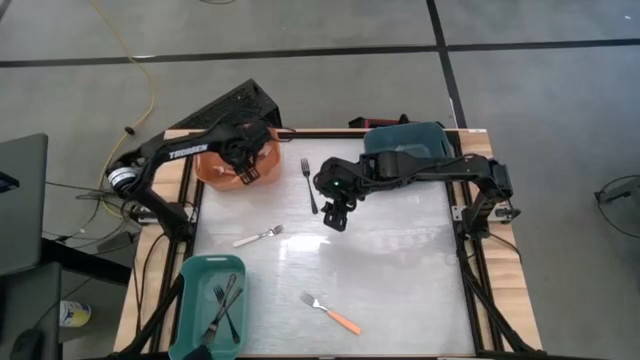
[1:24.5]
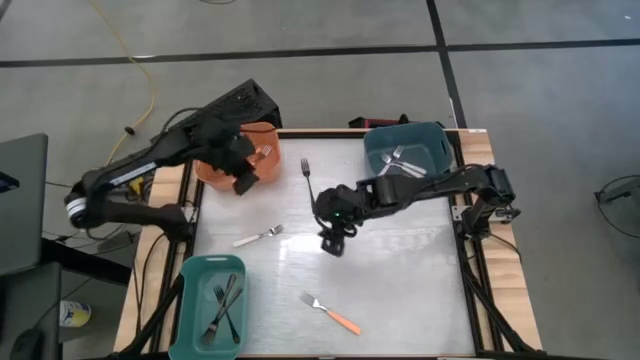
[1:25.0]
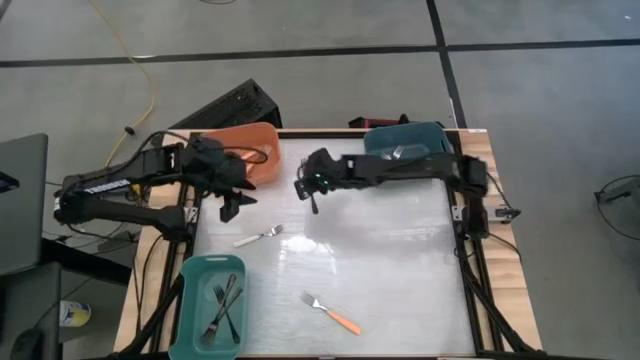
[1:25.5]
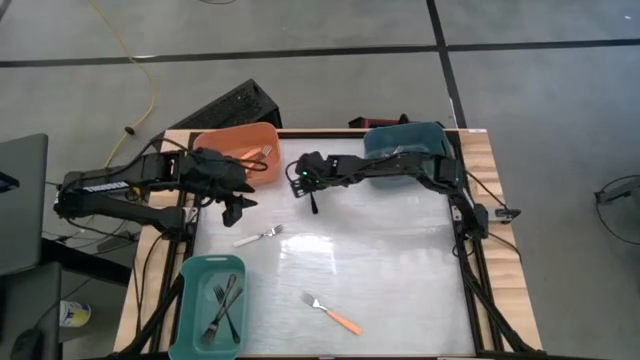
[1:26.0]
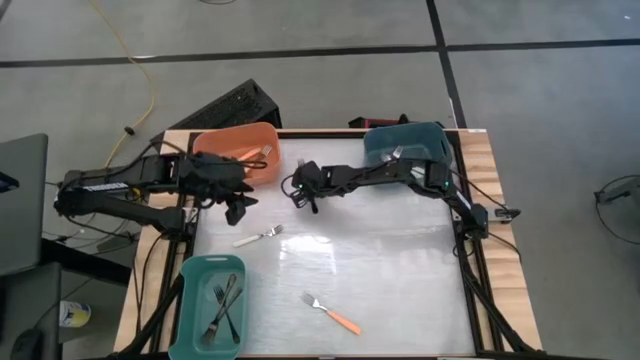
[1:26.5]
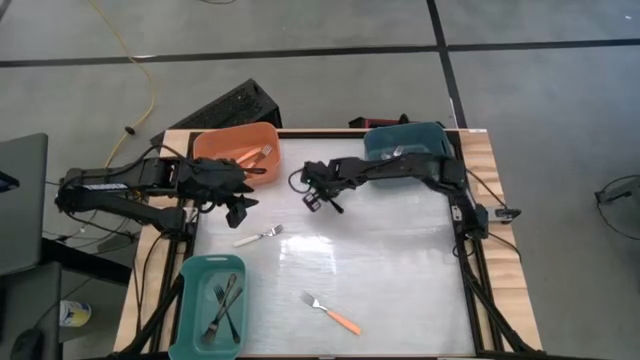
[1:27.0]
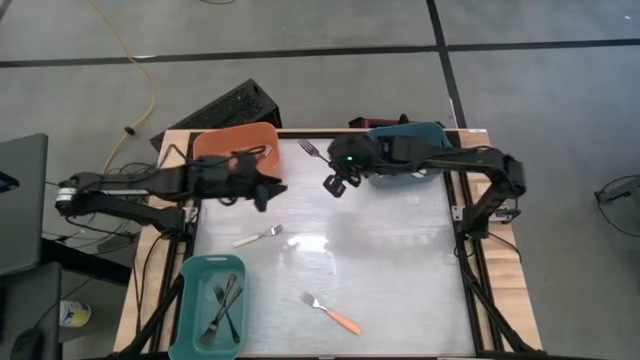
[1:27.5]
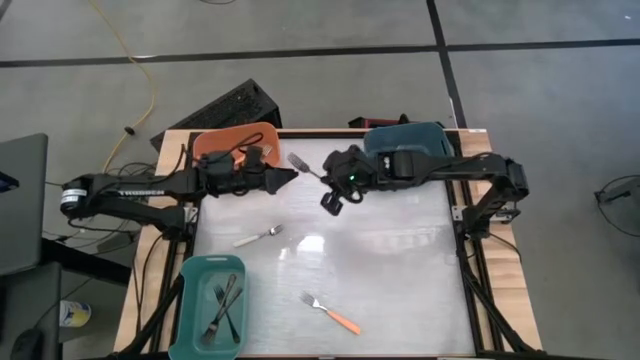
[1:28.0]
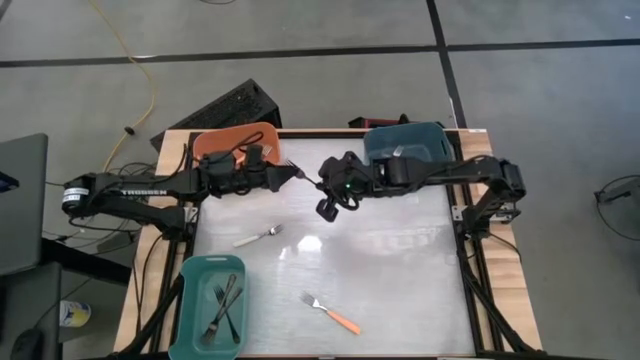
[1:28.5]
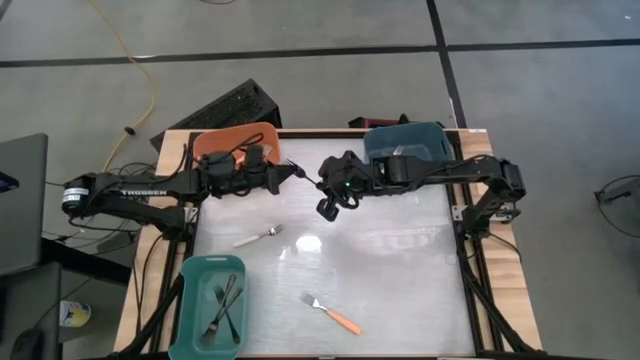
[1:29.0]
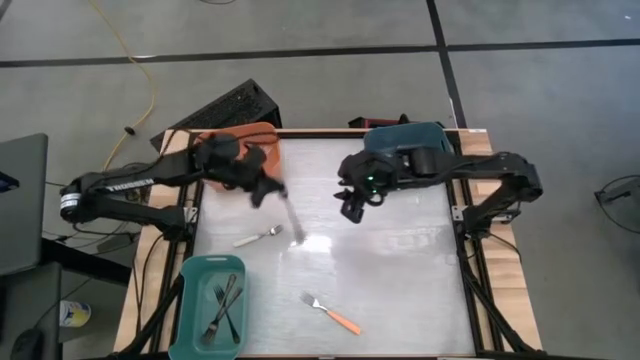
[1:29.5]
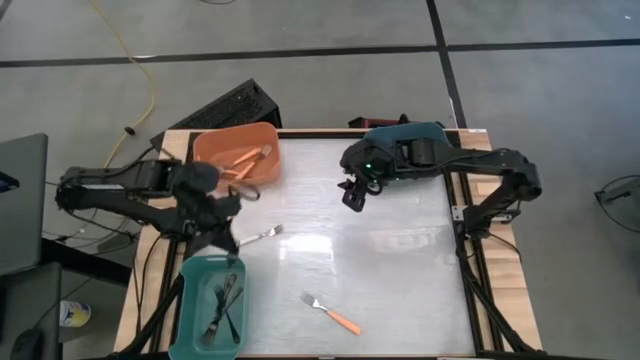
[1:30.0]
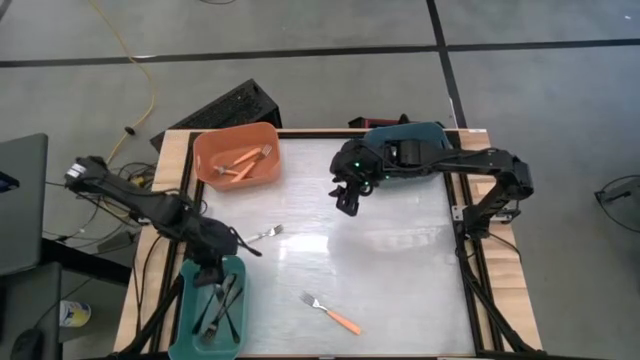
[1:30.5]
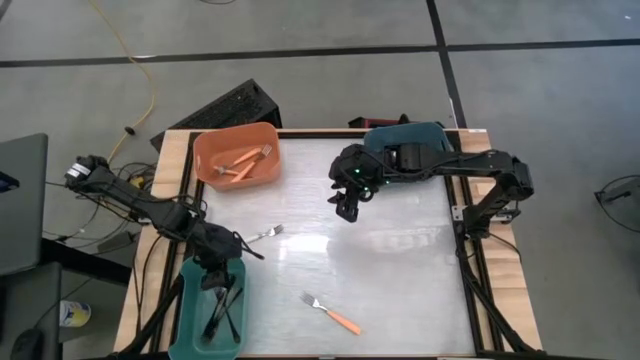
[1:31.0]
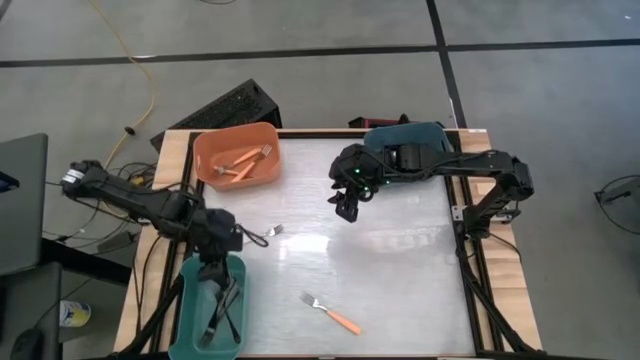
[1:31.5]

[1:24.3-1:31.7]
Task: Sort silverware by color (type)
Put the black fork into the green bin

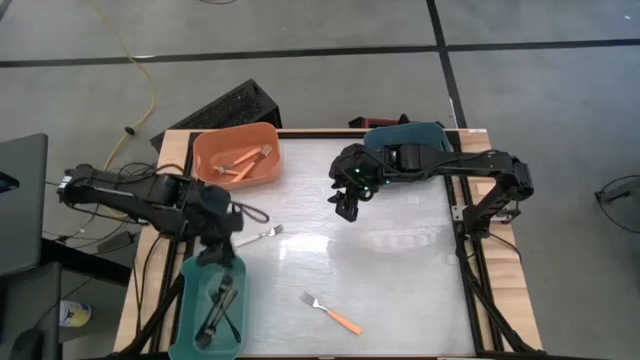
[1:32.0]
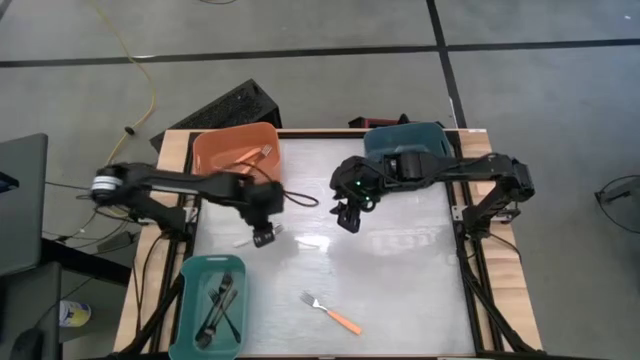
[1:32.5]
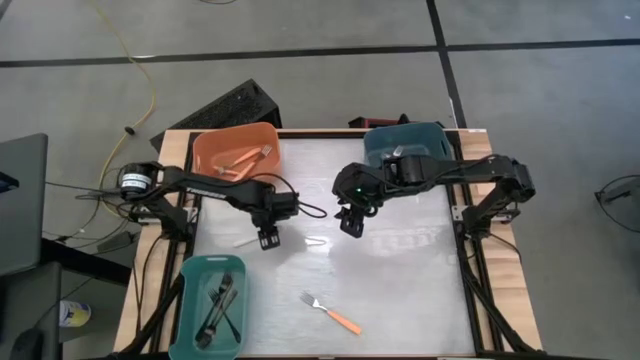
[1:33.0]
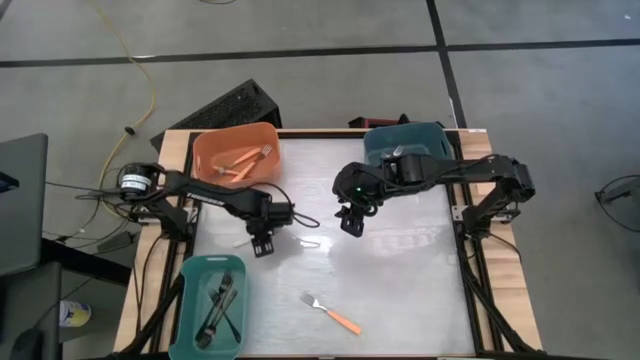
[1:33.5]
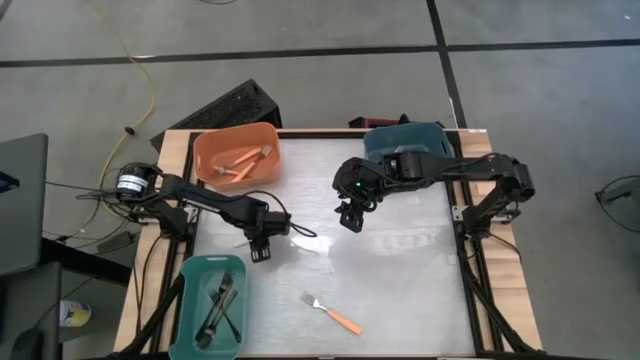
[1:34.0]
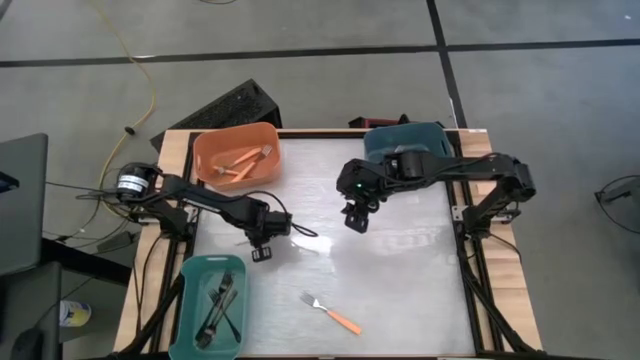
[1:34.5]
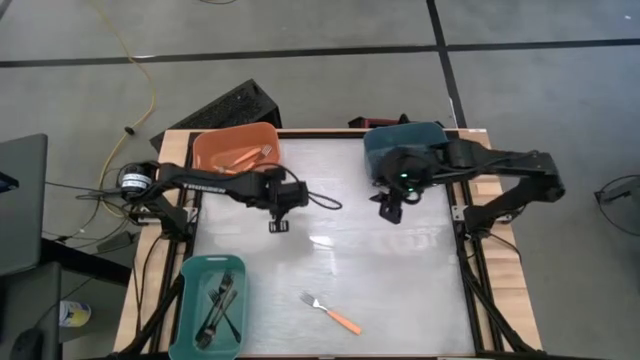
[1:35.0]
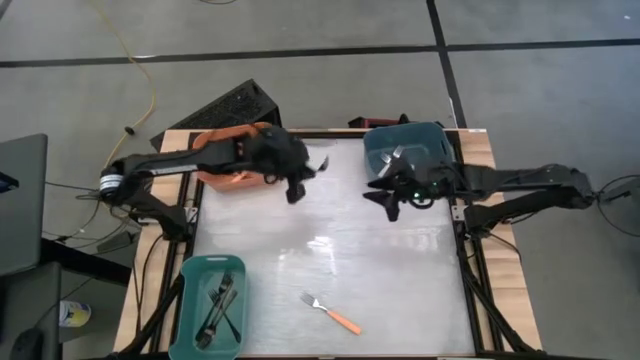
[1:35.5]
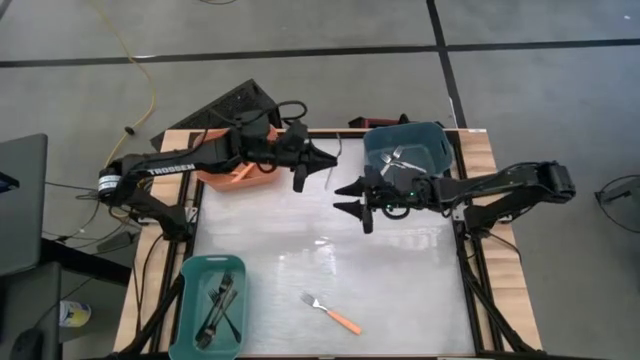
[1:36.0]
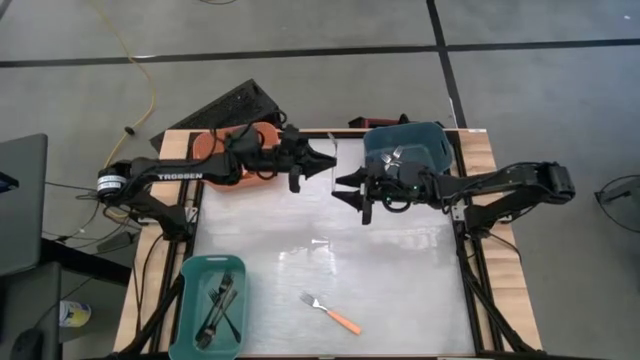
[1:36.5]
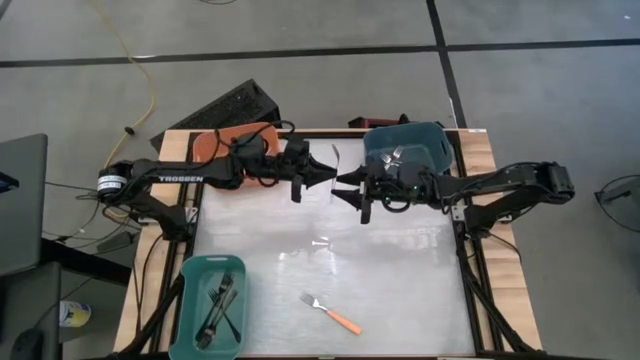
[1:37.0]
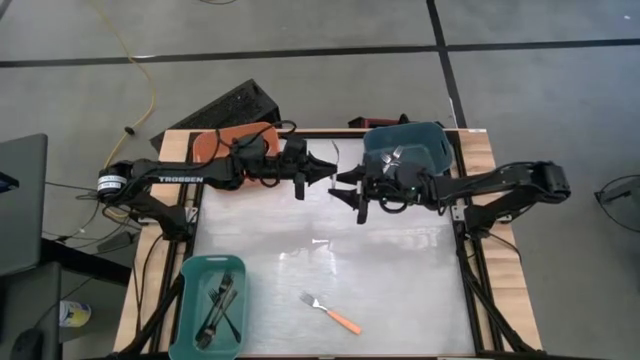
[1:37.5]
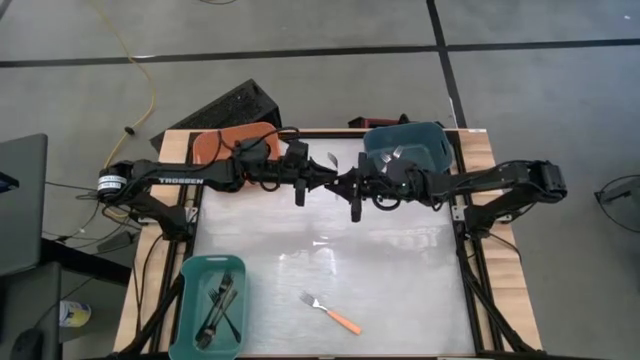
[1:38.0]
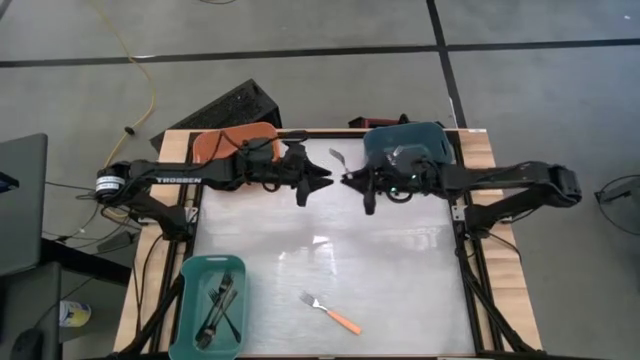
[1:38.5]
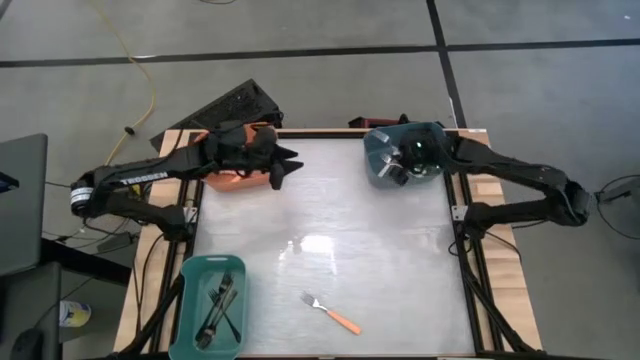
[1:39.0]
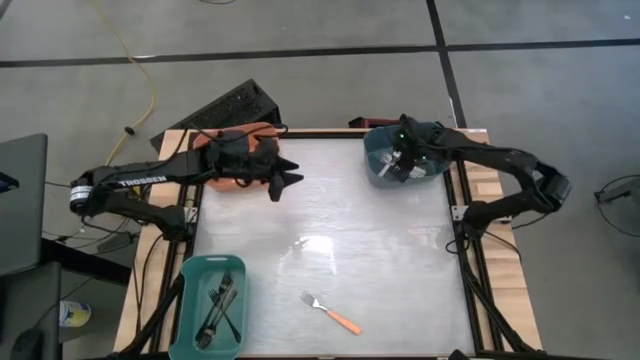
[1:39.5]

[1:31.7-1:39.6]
Put the white fork into the blue bin

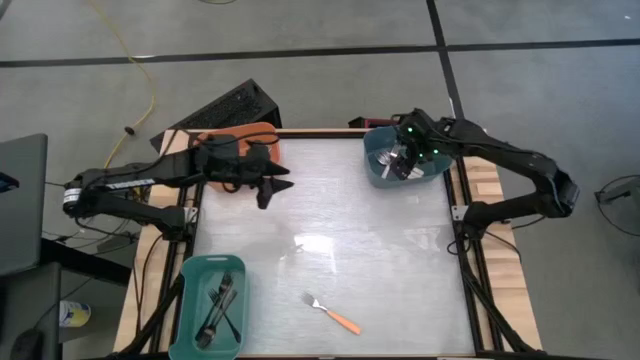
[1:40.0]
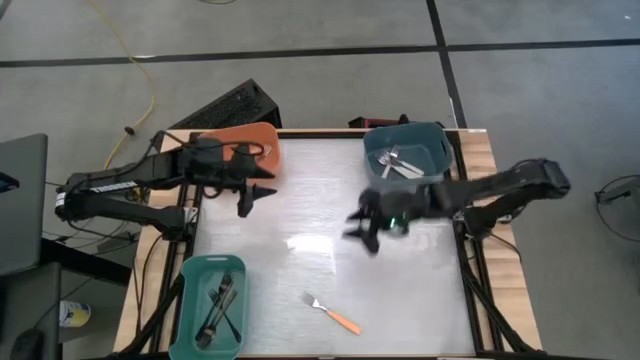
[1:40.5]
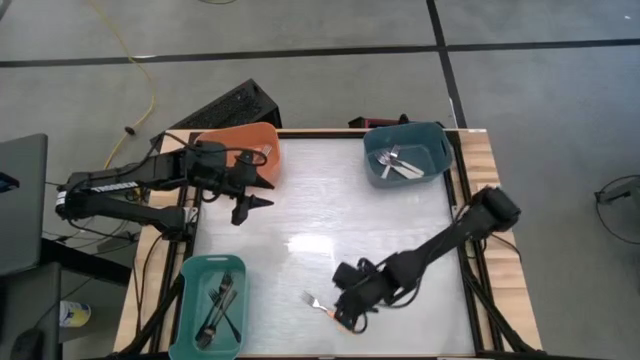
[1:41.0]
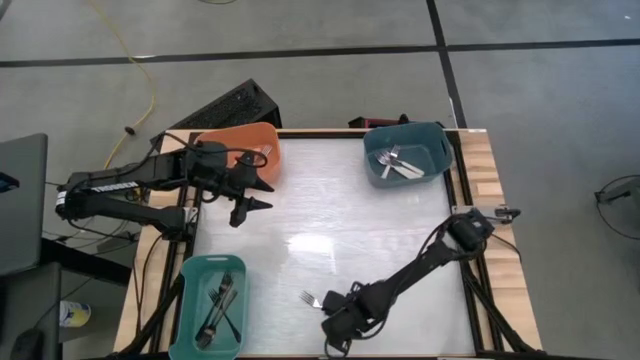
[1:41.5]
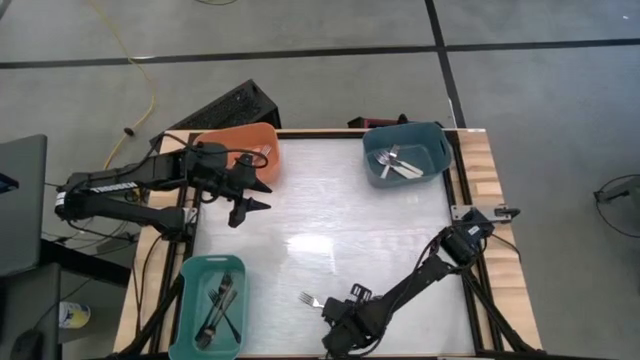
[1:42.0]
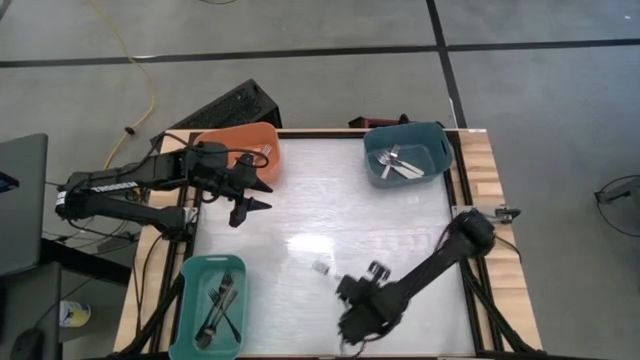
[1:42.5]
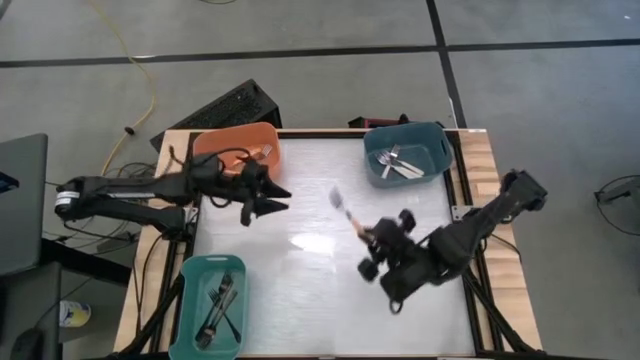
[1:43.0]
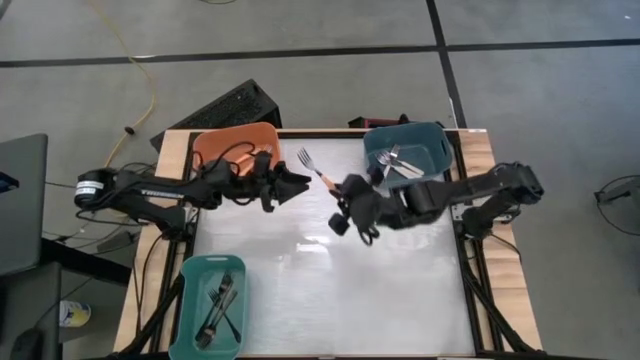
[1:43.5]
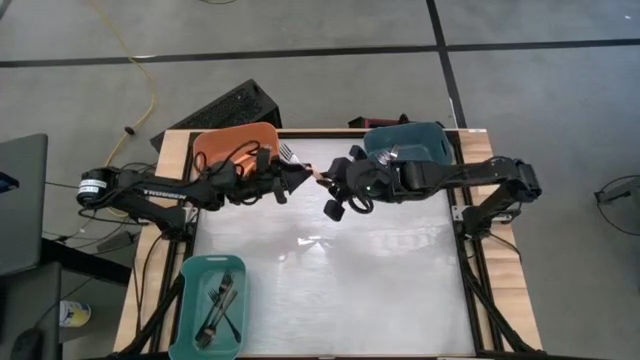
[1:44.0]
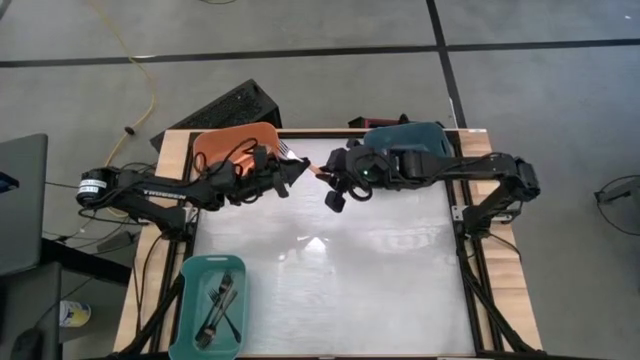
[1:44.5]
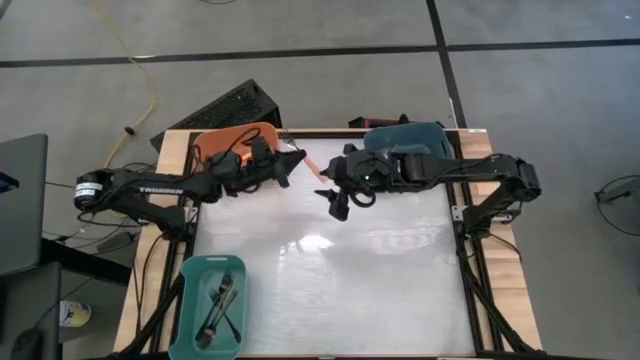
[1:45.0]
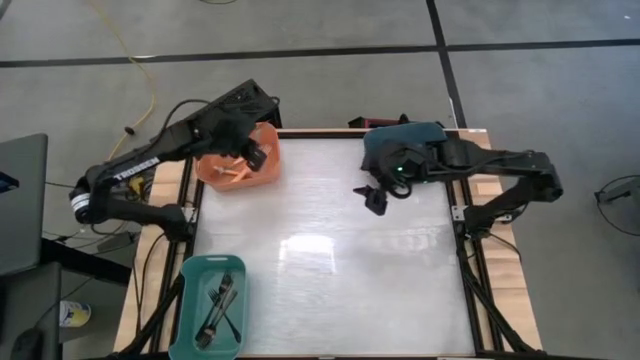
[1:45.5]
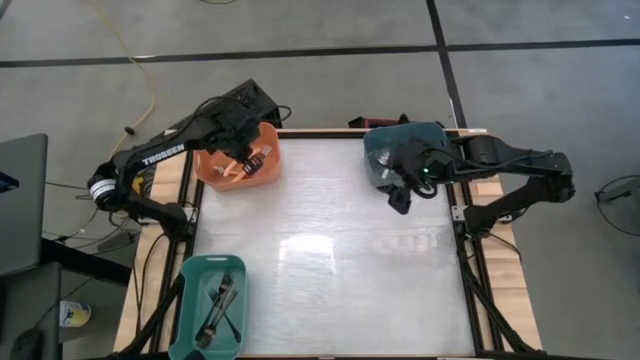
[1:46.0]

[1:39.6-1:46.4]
Put the orange fork into the orange bin
